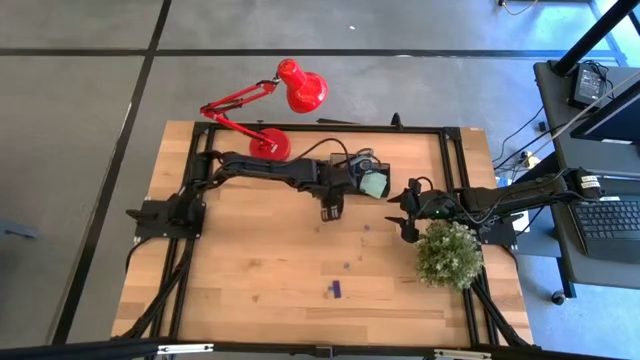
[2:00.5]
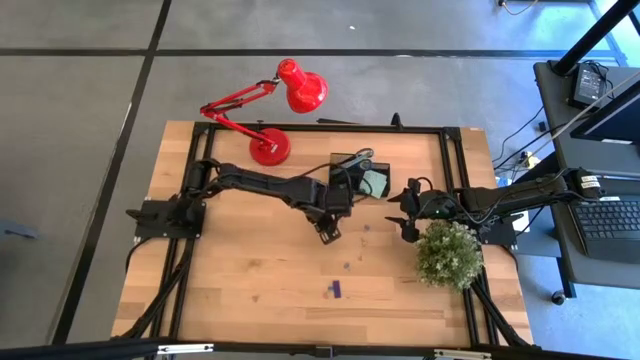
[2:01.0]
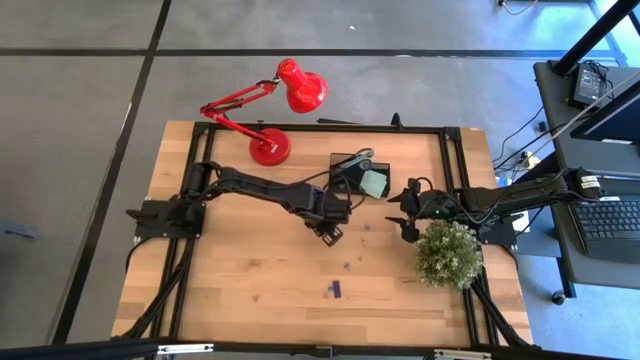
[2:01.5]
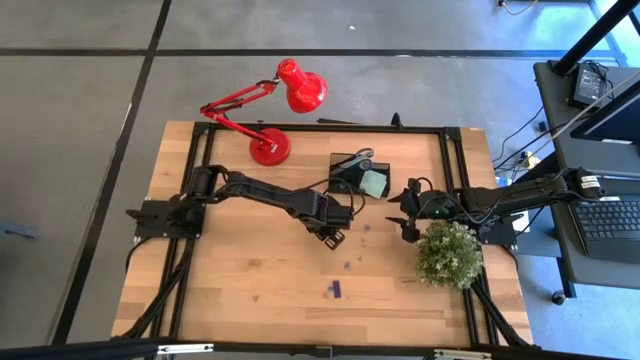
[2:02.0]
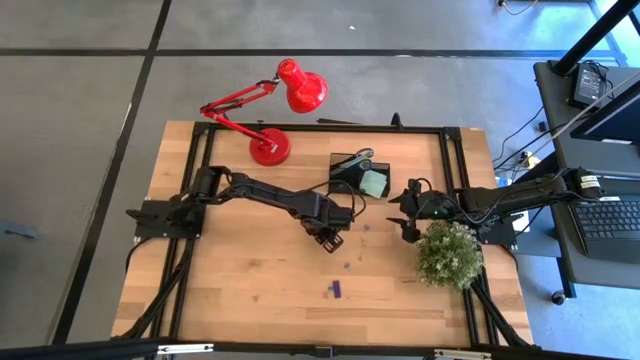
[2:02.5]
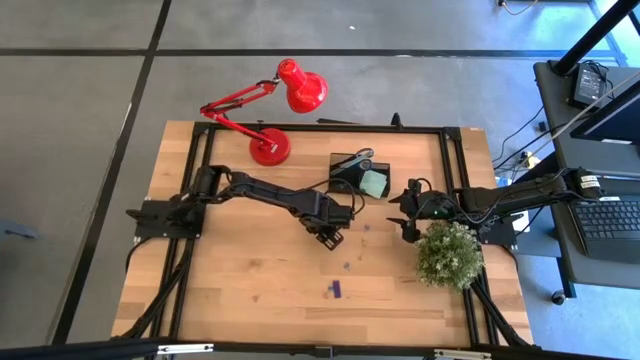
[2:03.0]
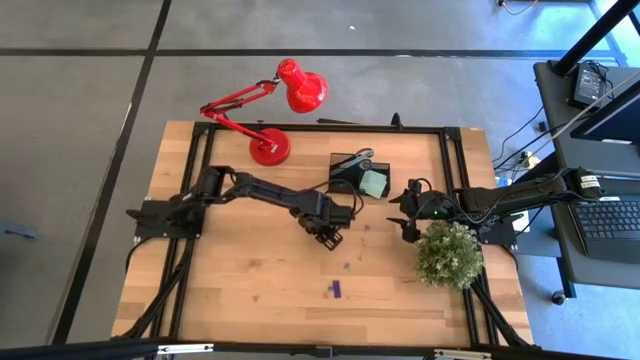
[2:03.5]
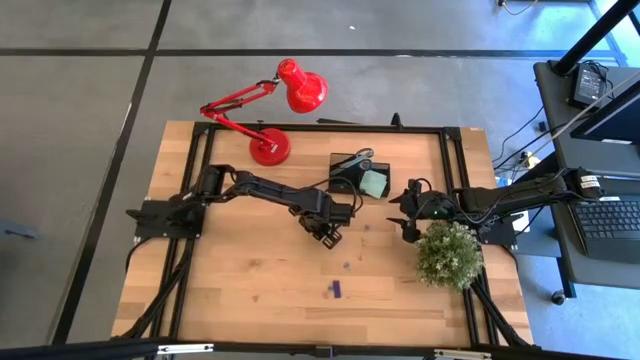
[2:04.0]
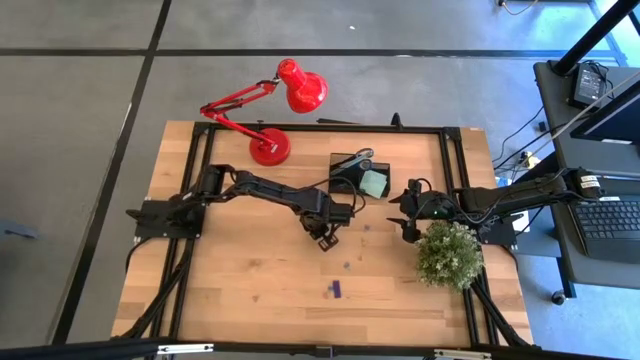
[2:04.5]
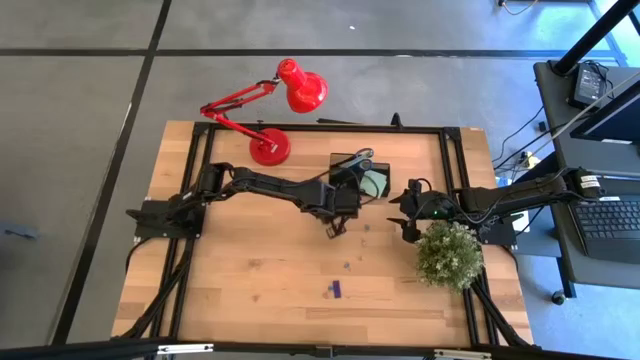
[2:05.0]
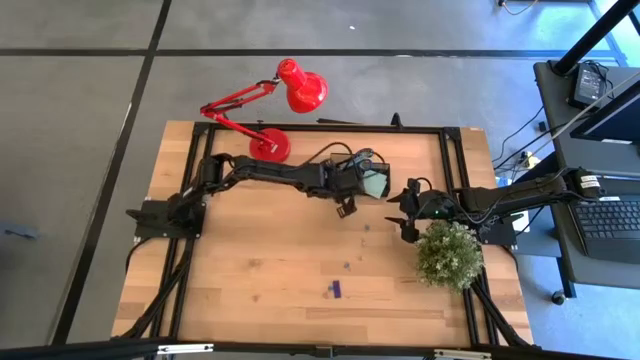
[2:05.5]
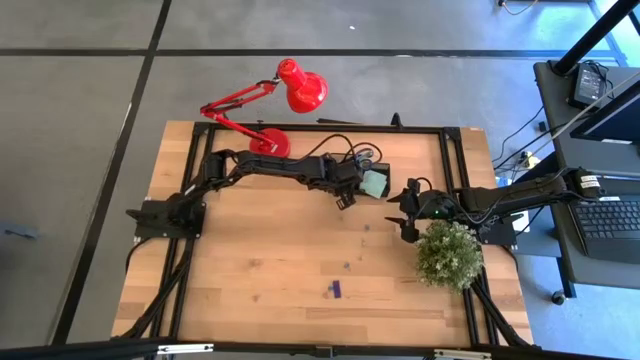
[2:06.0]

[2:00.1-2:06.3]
Task: Pick and place office supplies into organizer
Put the pink binder clip into the black desk organizer

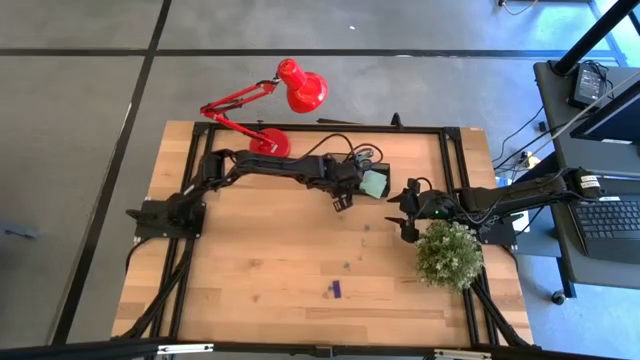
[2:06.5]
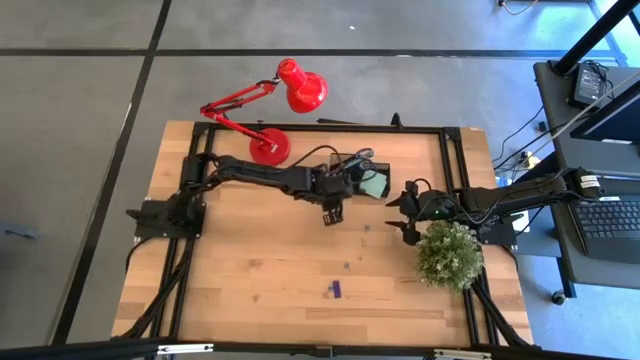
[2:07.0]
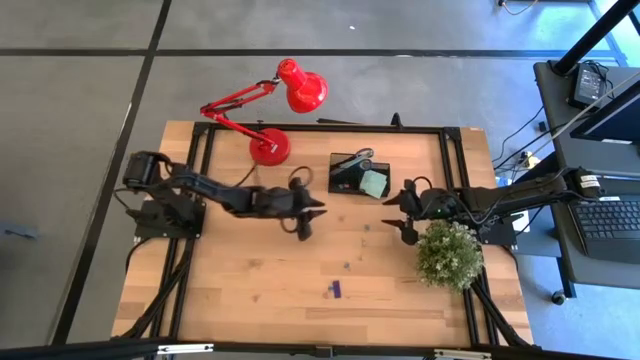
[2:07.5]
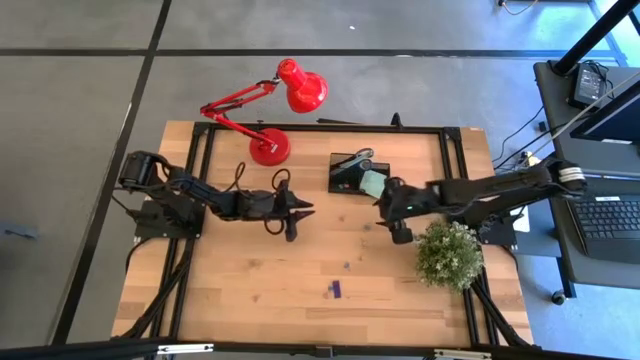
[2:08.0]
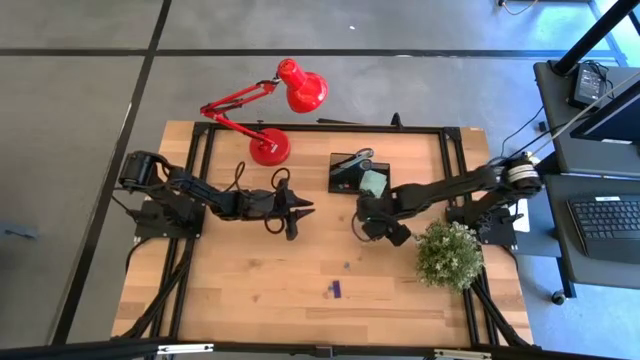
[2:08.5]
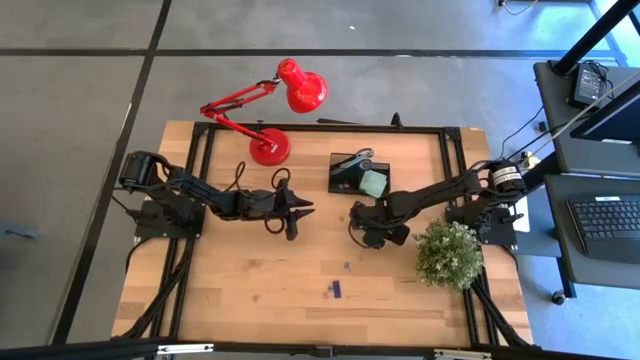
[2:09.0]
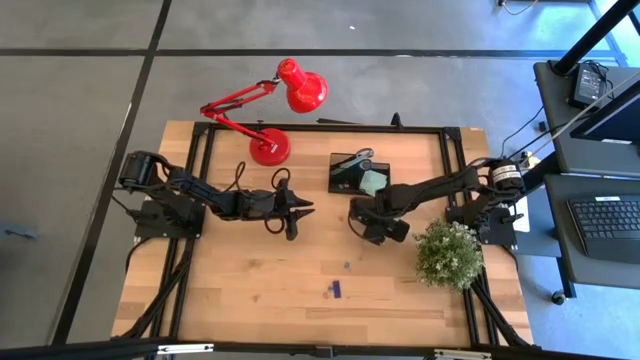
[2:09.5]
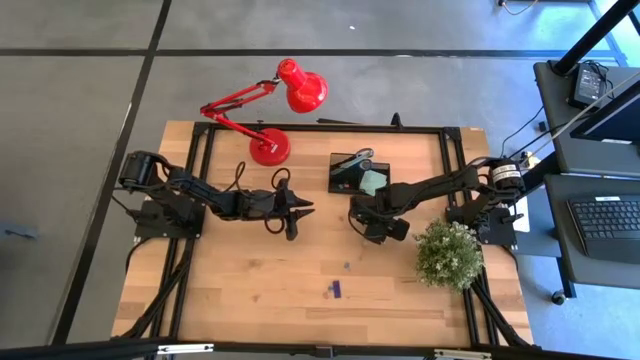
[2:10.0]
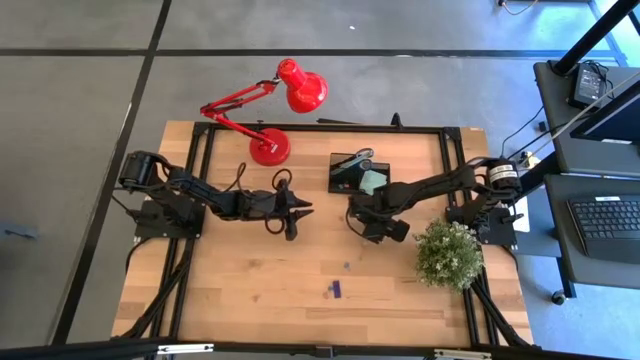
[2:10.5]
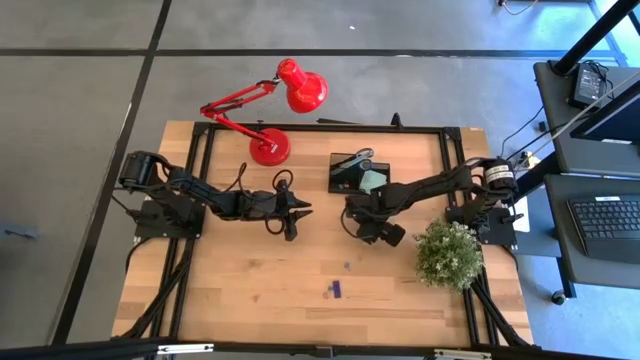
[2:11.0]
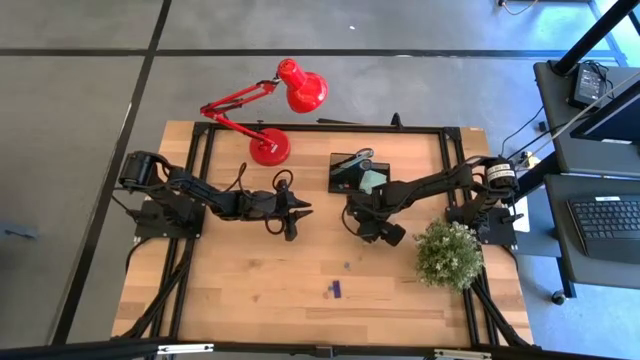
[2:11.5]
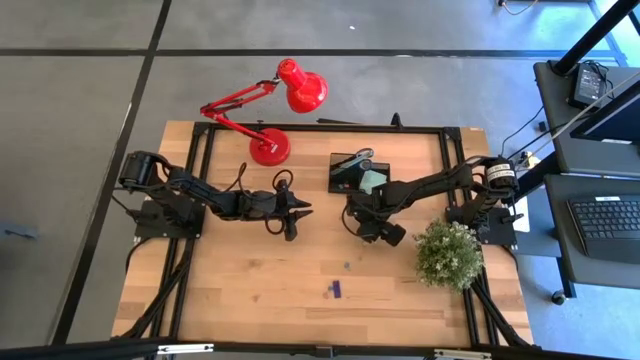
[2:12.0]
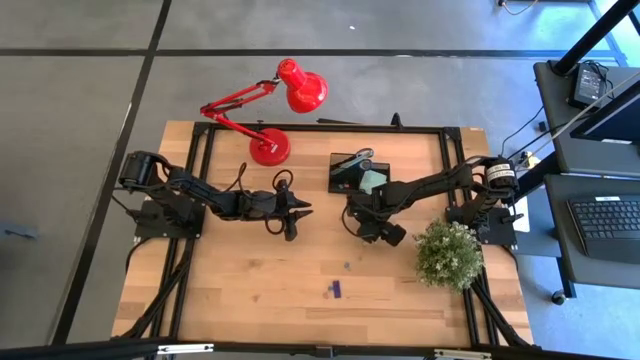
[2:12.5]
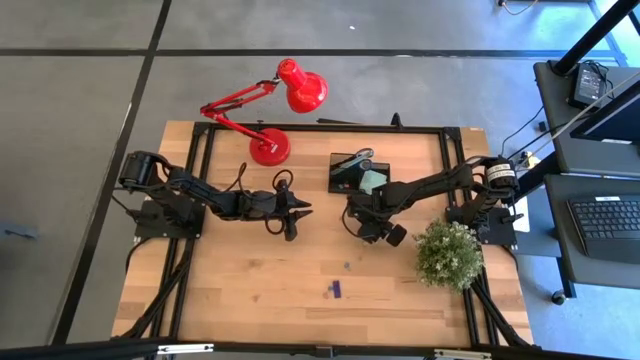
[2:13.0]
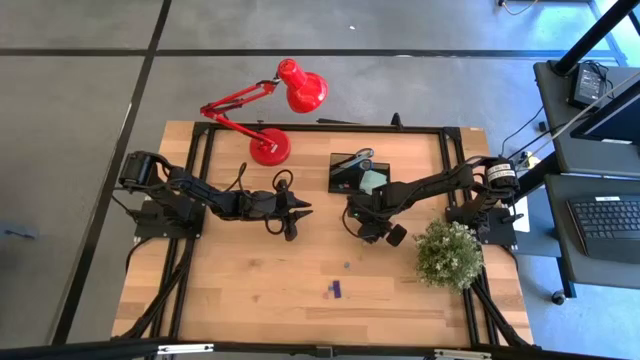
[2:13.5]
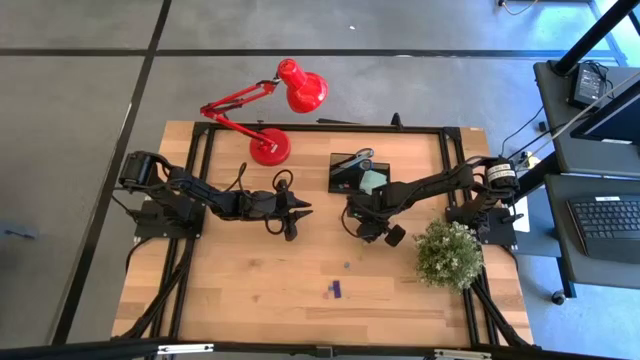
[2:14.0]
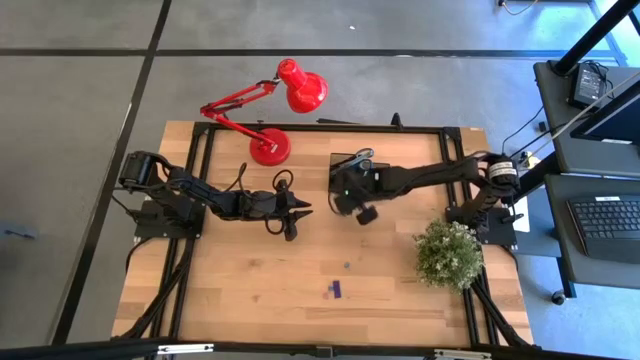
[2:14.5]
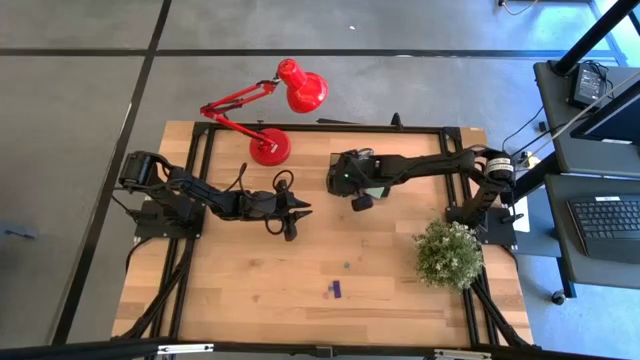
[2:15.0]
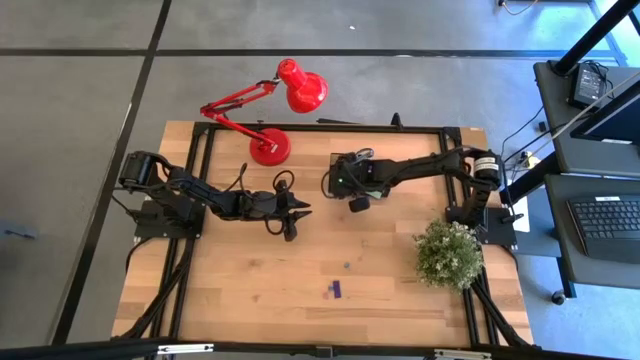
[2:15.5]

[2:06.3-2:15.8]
Put the top blue binder clip into the black desk organizer

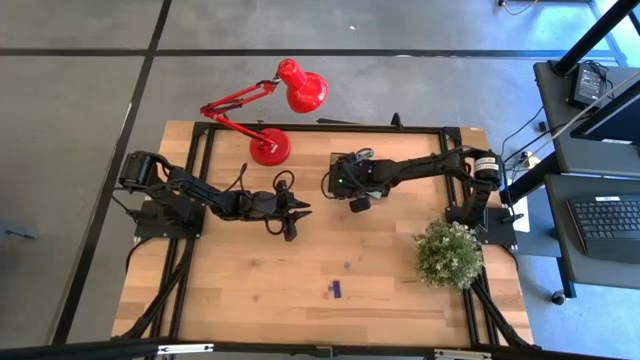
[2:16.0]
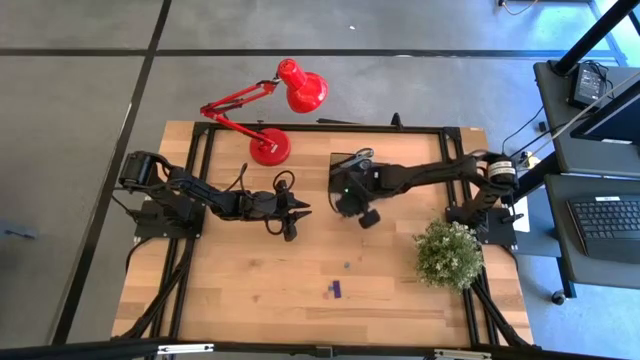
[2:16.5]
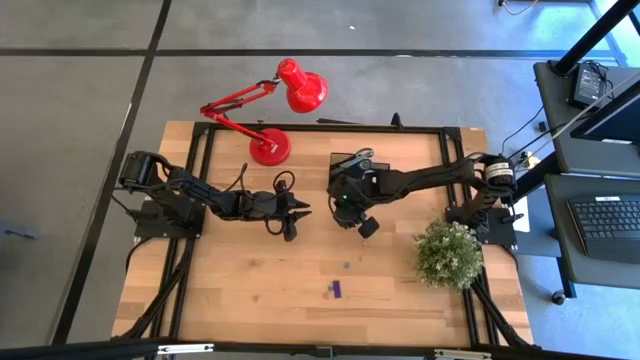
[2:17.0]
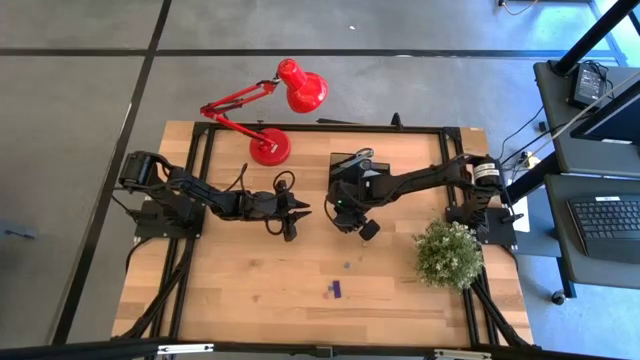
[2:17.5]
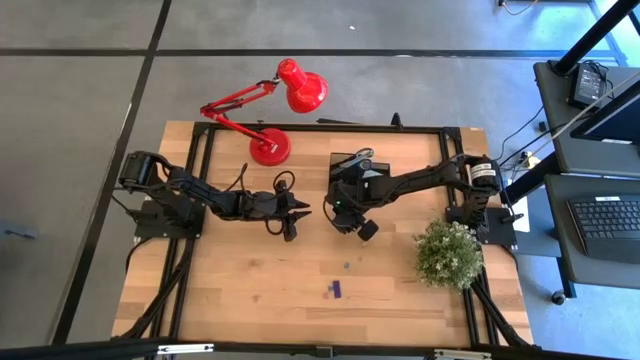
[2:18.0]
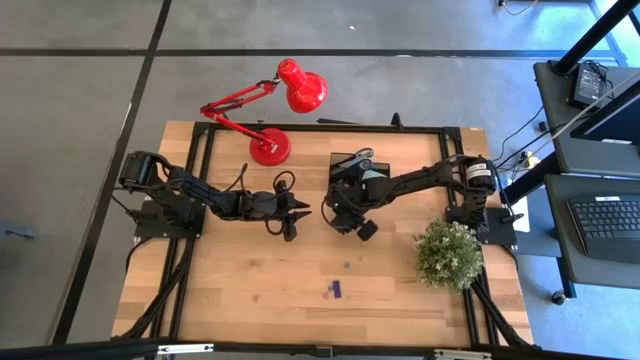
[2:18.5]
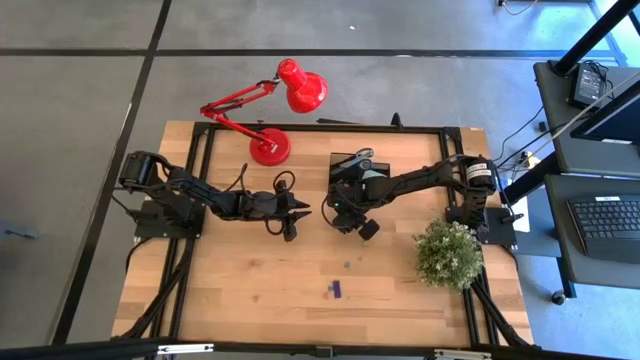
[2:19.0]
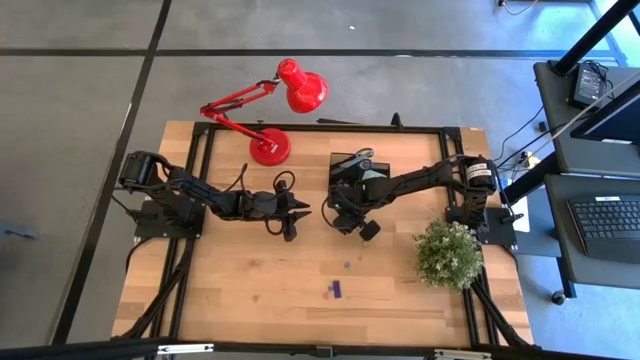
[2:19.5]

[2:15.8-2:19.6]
Put the top pink binder clip into the black desk organizer
